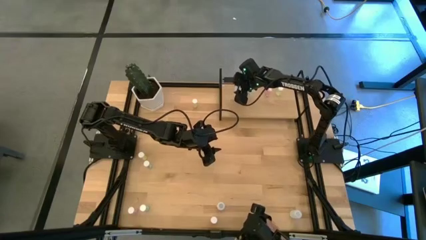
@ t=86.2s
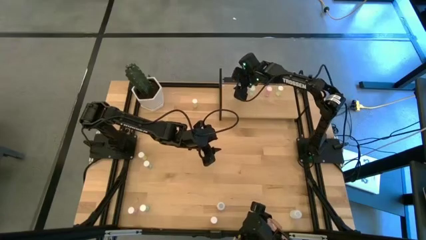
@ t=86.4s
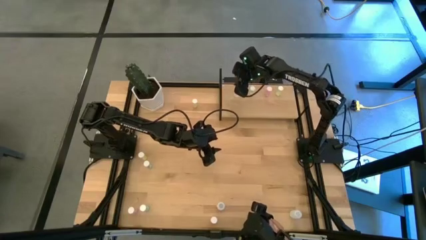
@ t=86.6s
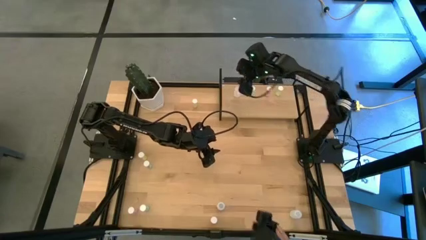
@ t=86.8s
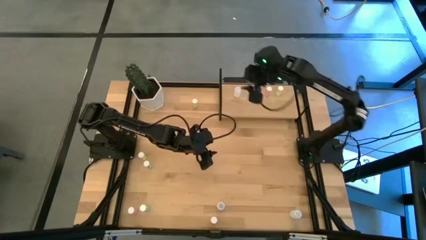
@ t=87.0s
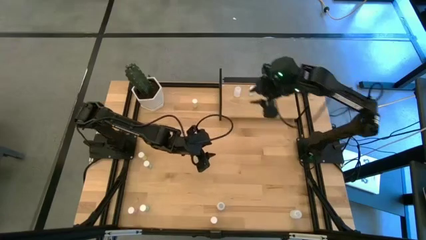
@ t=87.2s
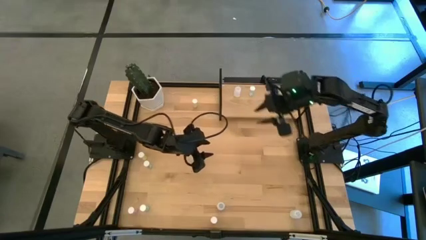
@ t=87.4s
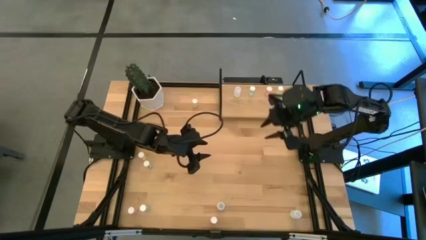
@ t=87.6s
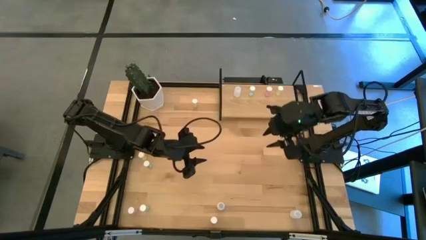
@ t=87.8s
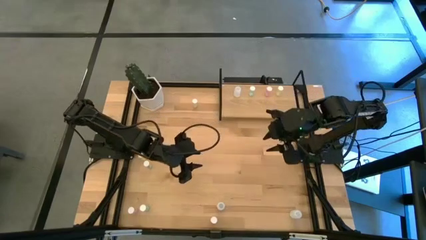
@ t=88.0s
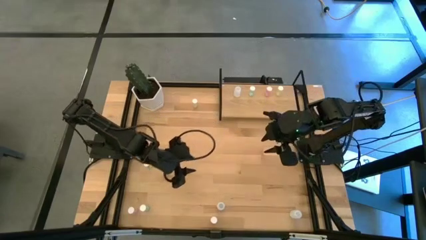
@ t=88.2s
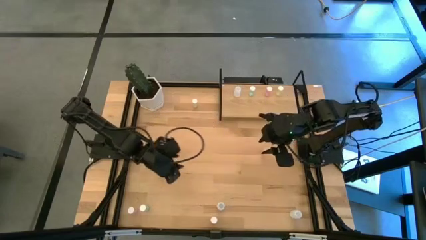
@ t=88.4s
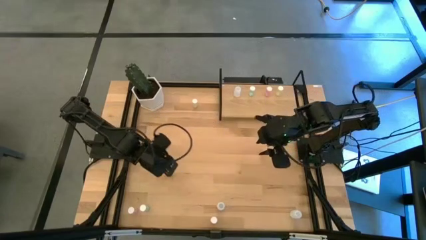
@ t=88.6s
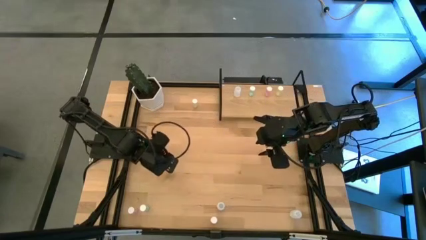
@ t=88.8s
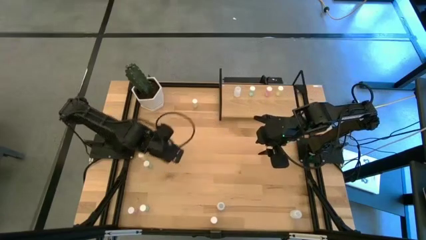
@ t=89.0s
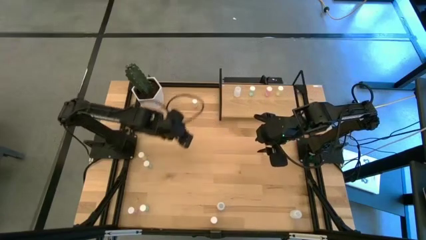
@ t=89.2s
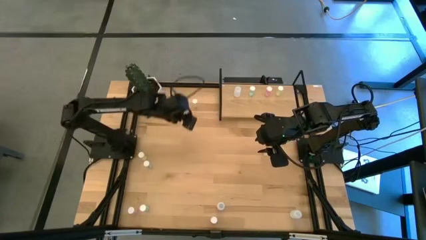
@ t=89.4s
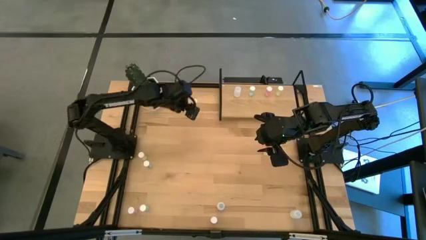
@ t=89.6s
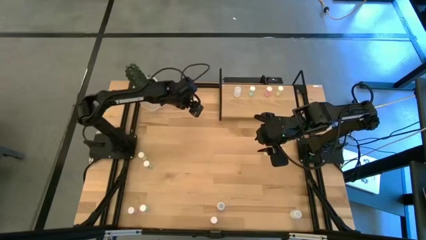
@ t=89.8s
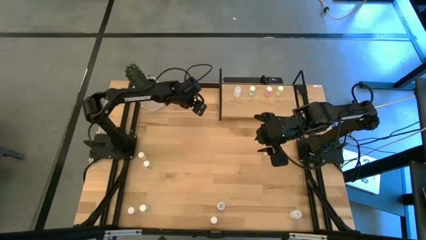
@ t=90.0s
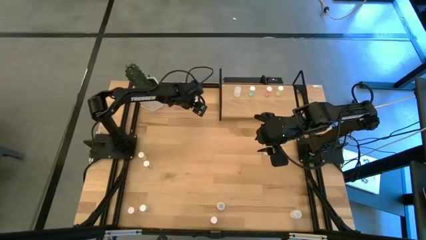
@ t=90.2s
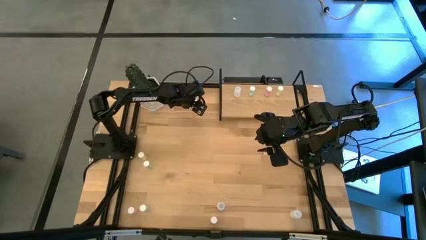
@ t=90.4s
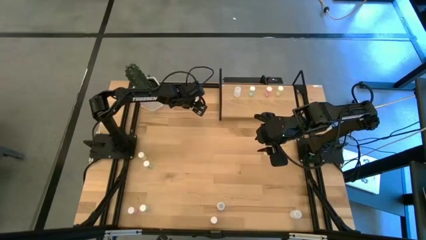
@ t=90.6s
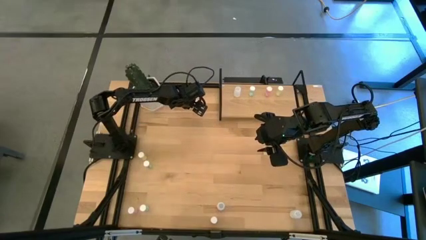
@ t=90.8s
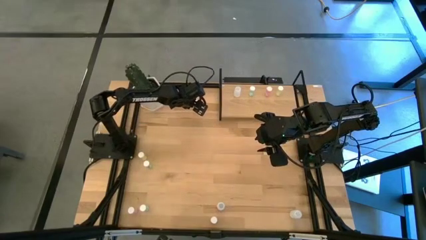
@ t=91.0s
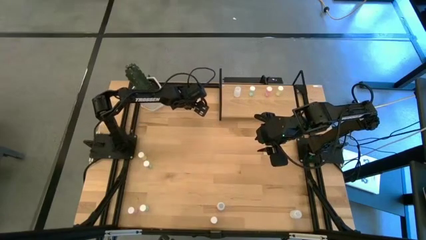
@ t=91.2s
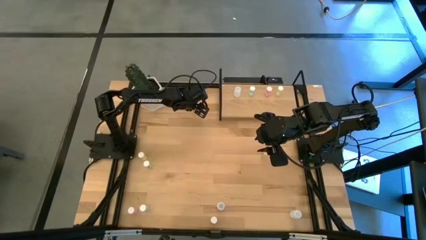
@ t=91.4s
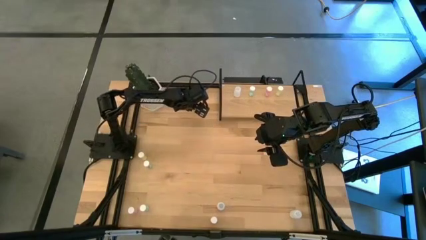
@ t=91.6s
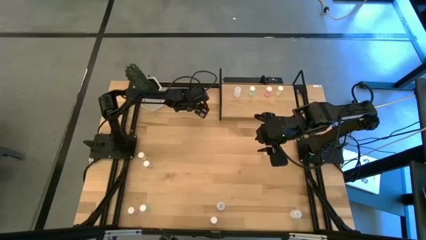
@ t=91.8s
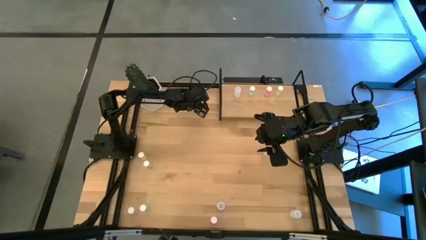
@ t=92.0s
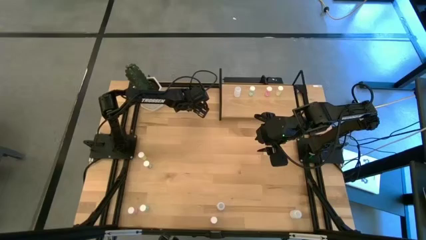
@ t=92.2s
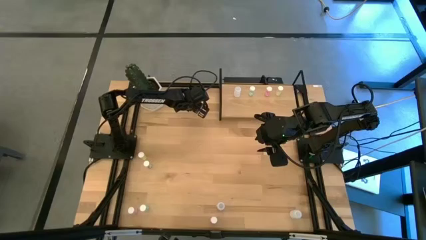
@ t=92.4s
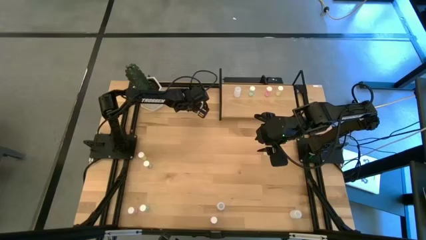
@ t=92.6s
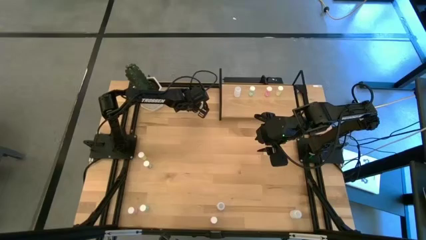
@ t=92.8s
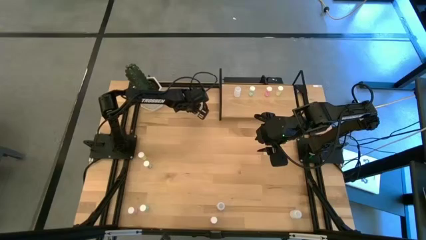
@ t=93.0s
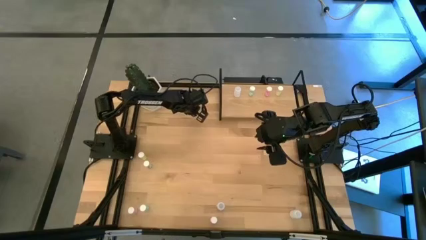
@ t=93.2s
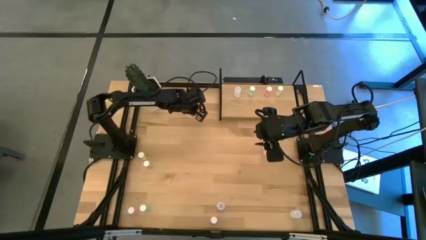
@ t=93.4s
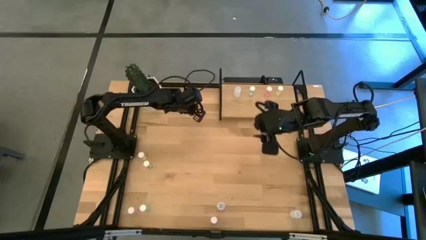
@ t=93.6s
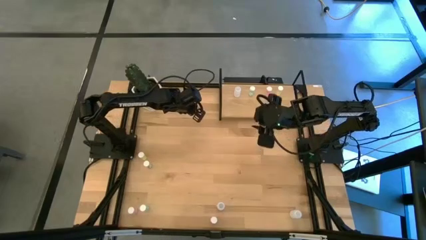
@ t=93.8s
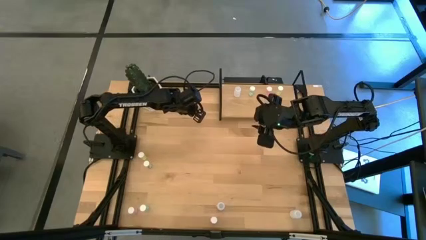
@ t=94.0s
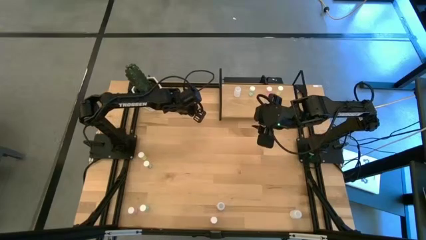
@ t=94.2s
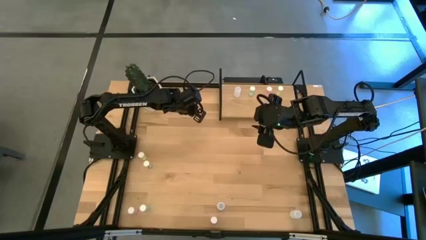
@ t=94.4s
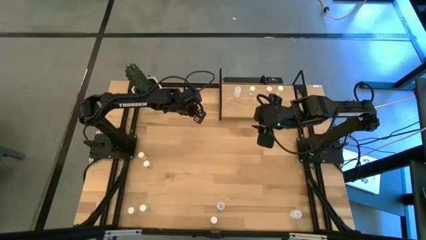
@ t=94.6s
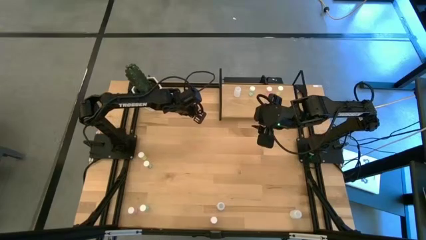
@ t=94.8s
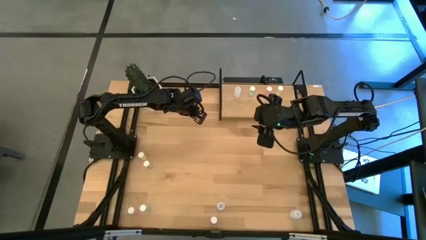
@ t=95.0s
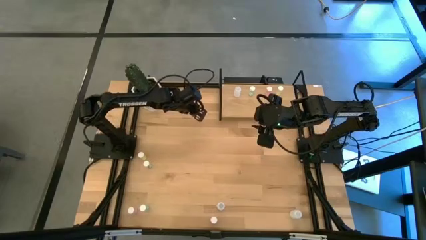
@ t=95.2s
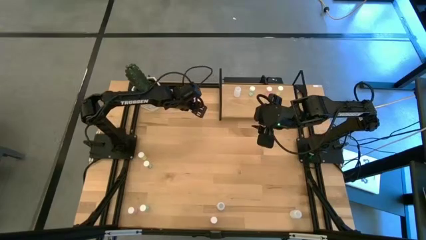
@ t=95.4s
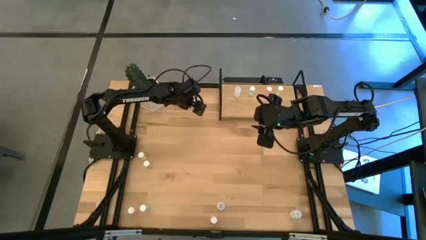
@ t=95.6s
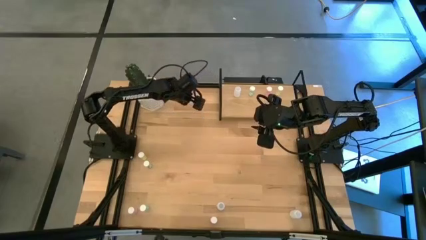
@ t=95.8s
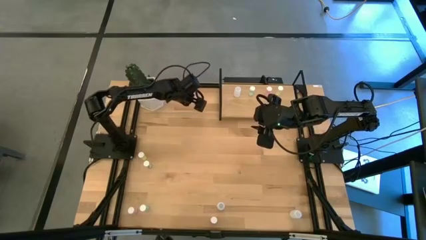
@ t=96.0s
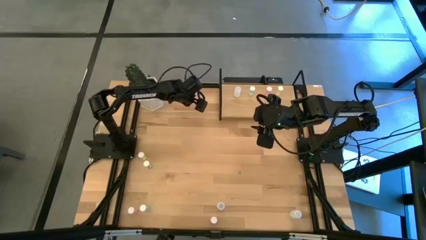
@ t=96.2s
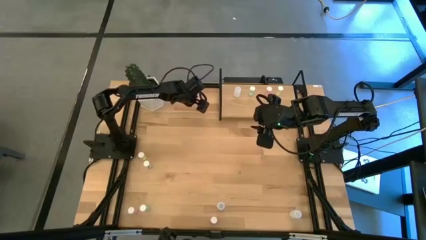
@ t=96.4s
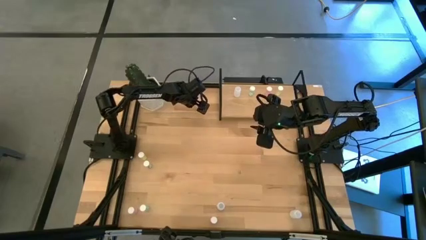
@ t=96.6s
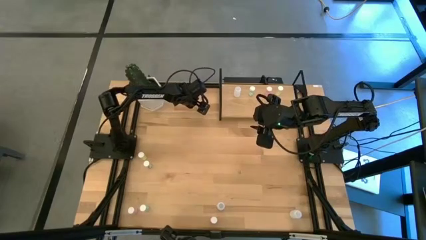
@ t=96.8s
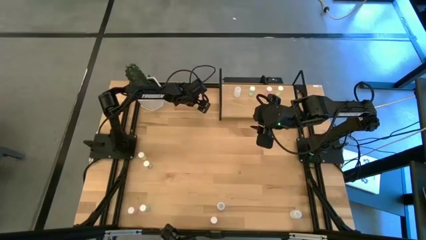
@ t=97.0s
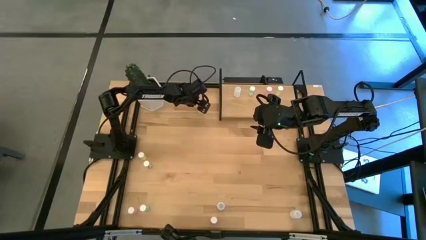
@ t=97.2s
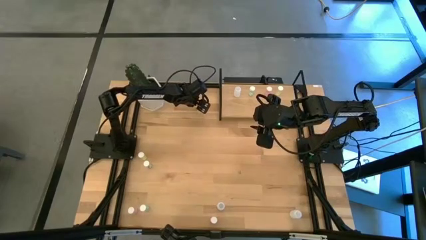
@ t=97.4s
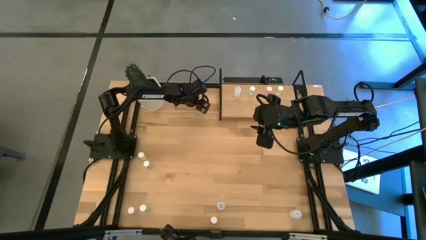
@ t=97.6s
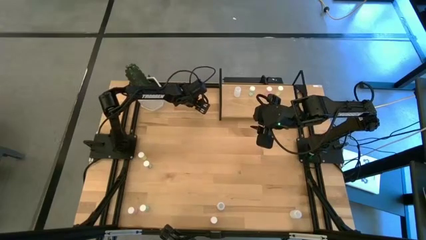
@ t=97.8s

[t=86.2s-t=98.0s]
Task: Pick and place medicine bottles onto shelf by color
Put the top yellow pill bottle on the shelf aligned with the other yellow pill bottle

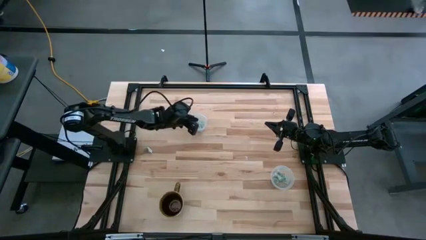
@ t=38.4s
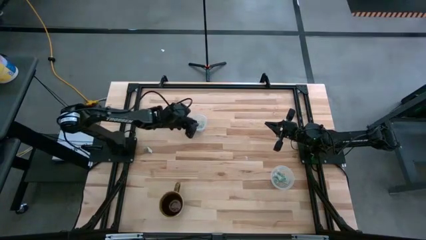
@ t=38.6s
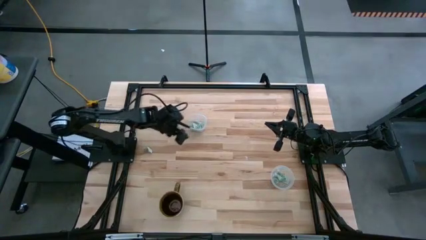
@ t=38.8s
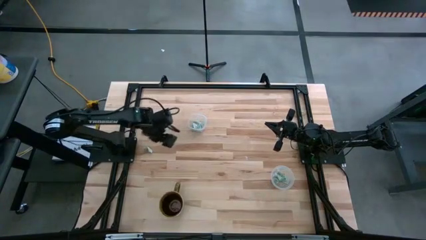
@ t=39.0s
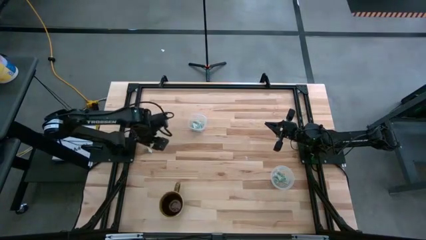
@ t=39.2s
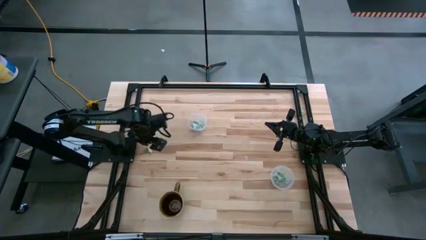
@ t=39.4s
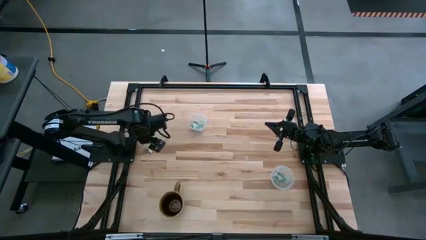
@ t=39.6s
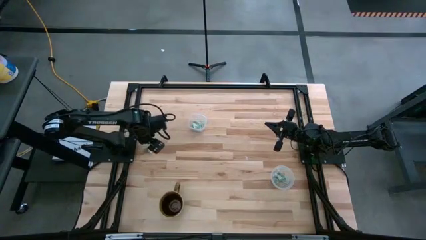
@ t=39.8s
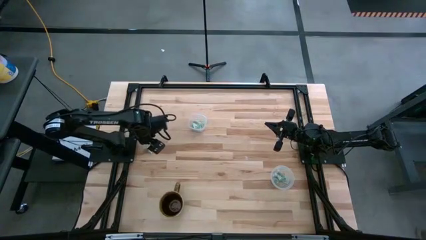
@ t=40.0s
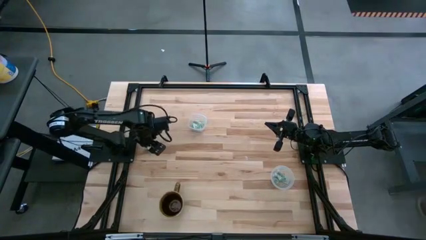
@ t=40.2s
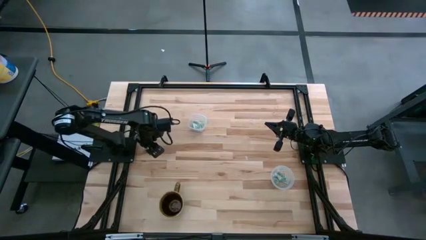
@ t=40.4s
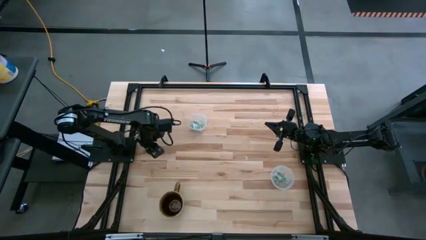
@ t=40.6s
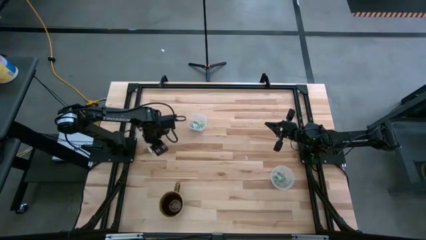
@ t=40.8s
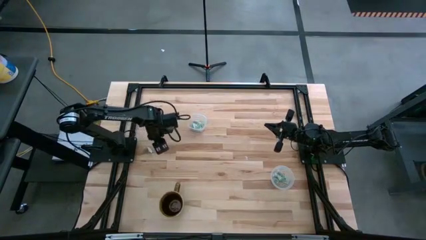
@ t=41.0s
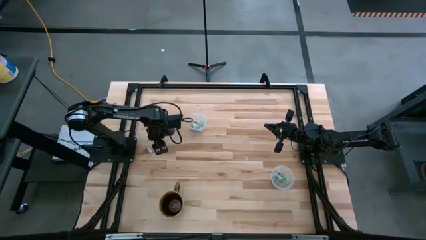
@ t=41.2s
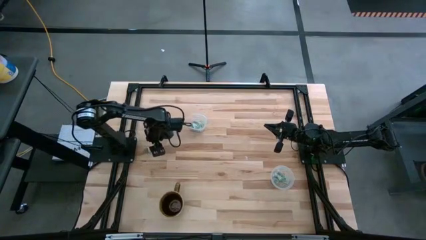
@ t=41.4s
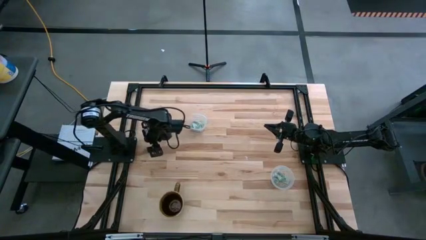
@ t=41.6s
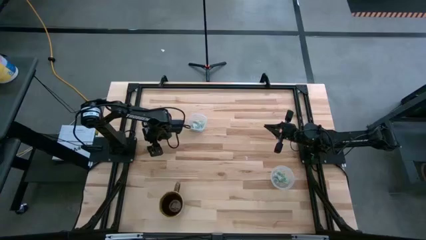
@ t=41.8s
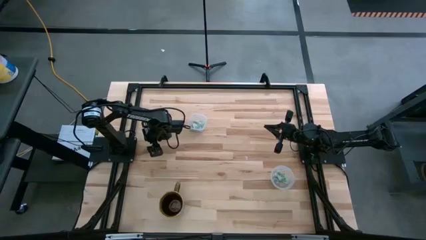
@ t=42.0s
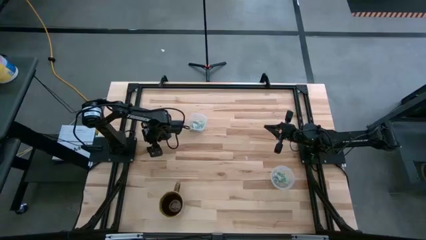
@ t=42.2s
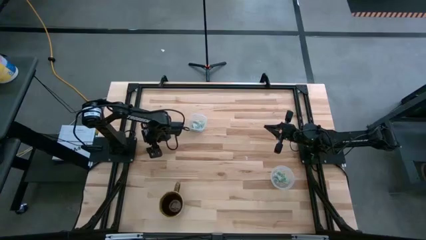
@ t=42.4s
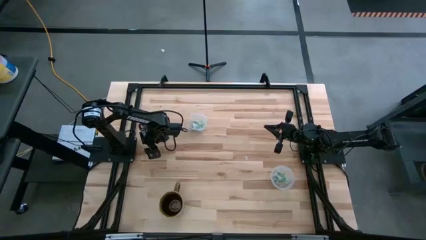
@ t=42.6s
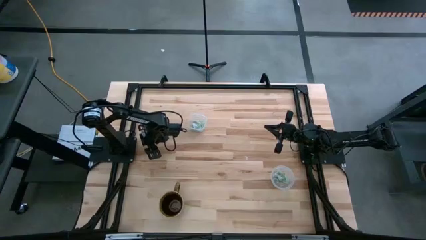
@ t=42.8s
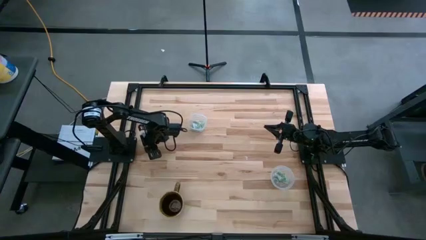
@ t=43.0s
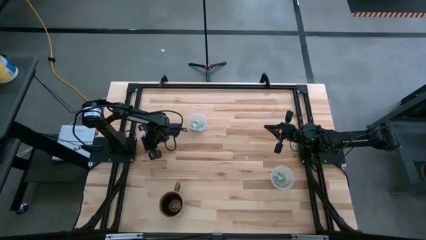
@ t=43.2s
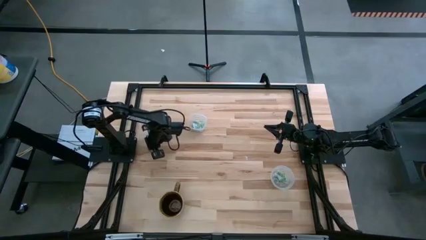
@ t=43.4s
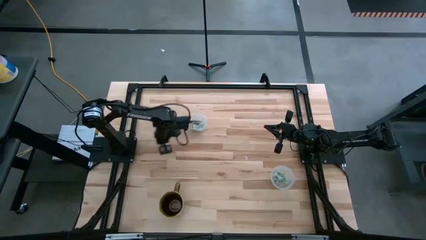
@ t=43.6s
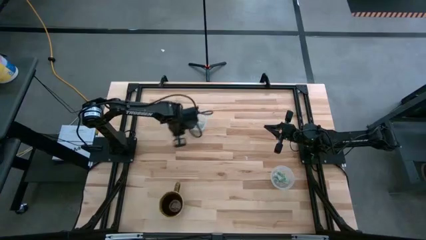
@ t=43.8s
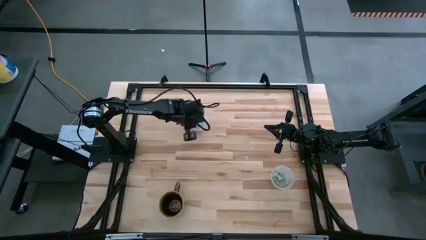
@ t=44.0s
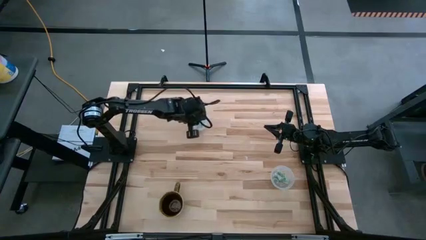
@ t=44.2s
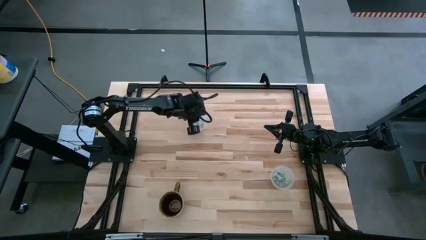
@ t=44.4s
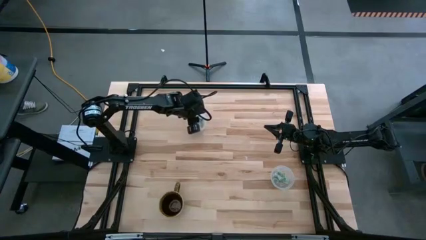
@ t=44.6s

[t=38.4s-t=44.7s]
Task: Pick and place items into bin
Put the white stevia packet into the top transparent bin
